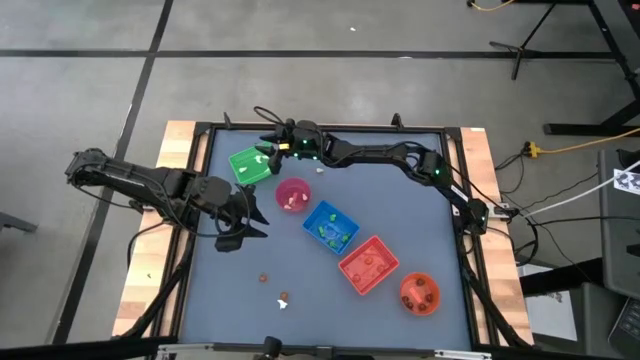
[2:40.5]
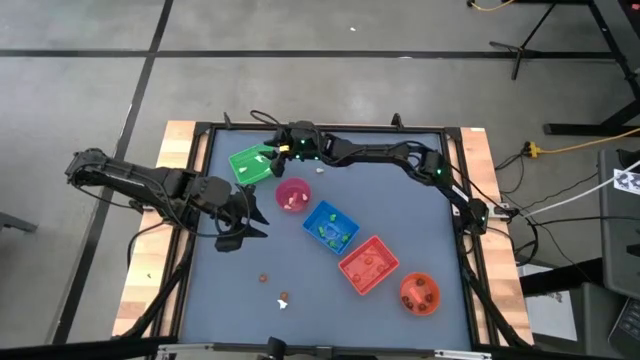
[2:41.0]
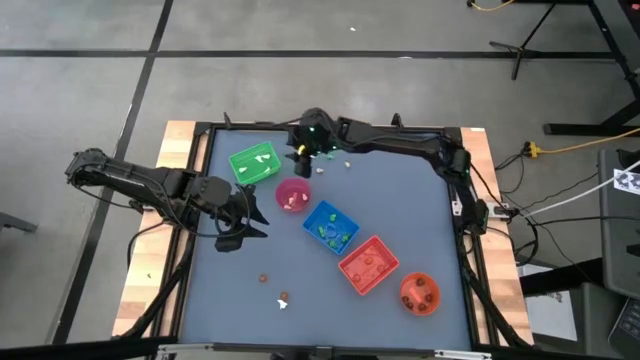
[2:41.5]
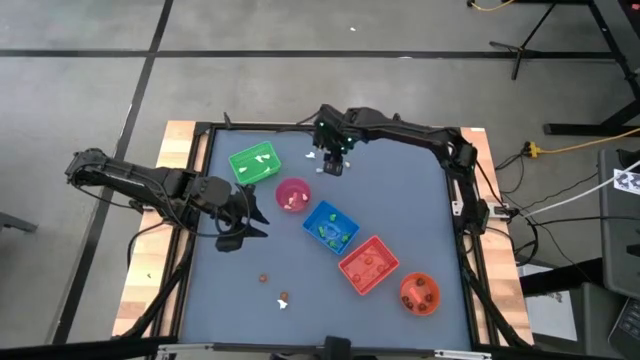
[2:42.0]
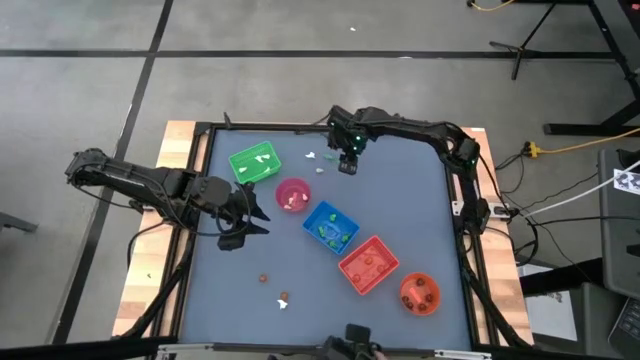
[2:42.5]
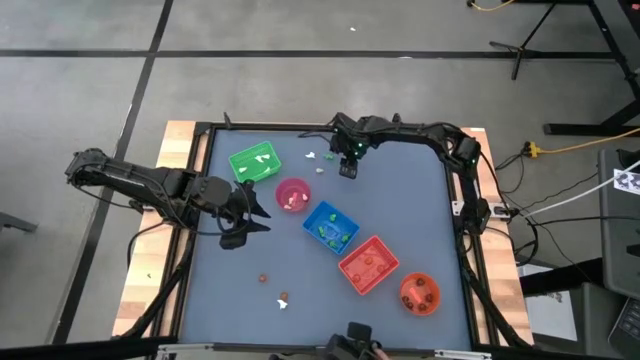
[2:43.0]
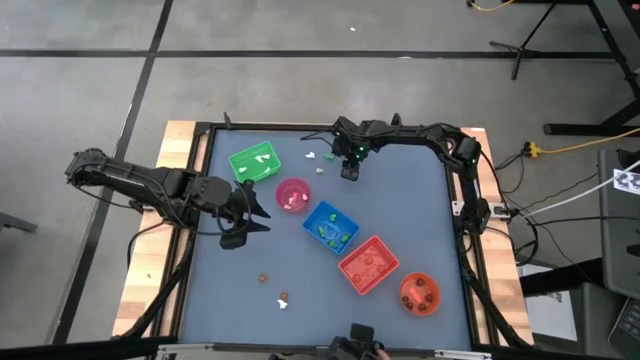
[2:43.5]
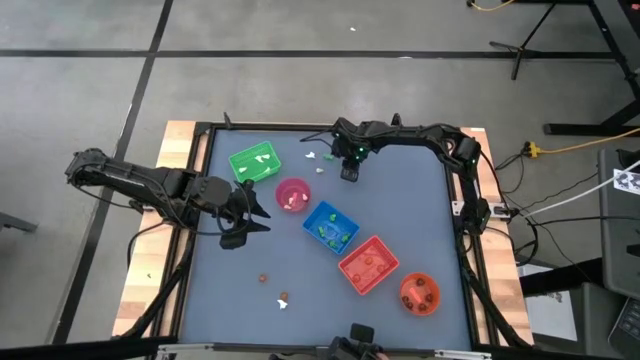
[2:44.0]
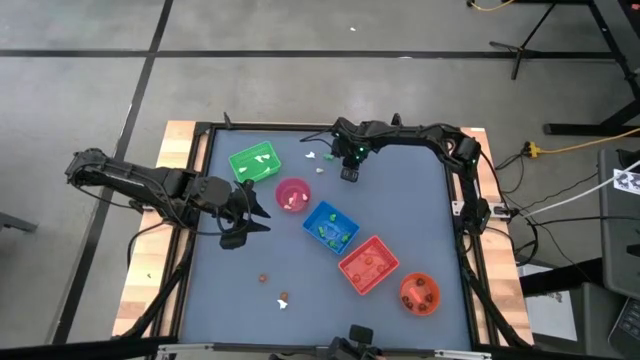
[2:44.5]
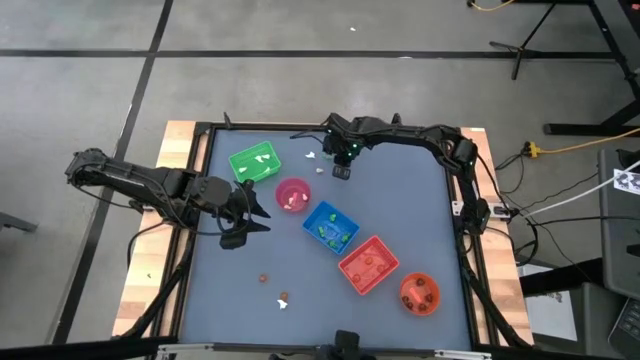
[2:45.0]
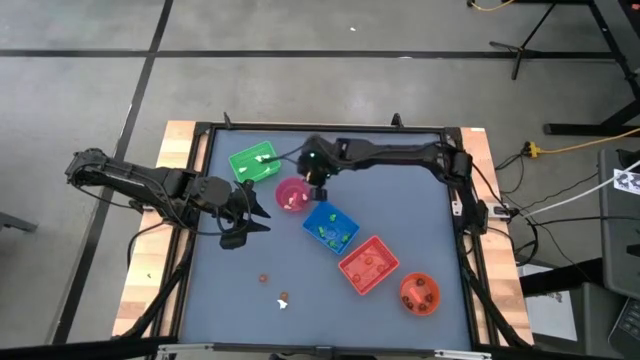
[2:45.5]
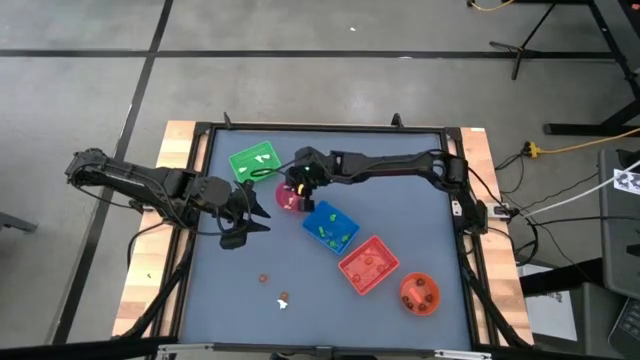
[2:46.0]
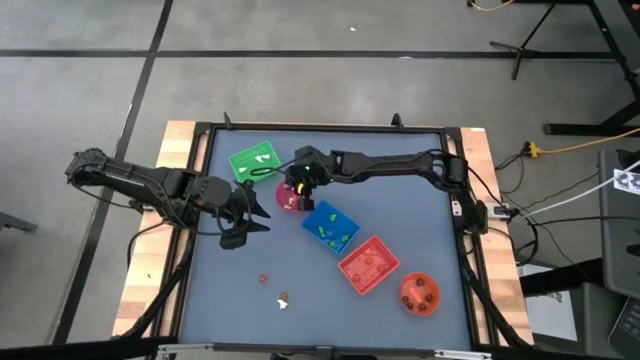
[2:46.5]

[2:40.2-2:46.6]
Task: Sort Halloween decoration
Put the light brown skull toy into the light red bin

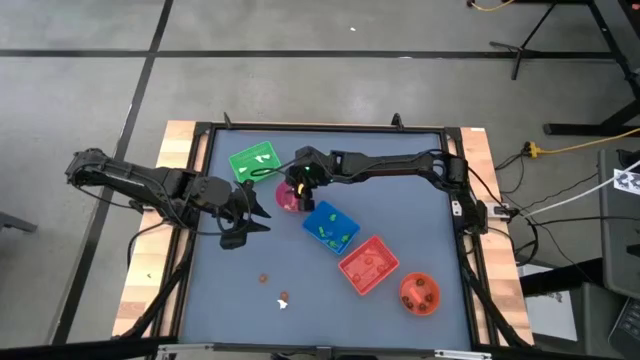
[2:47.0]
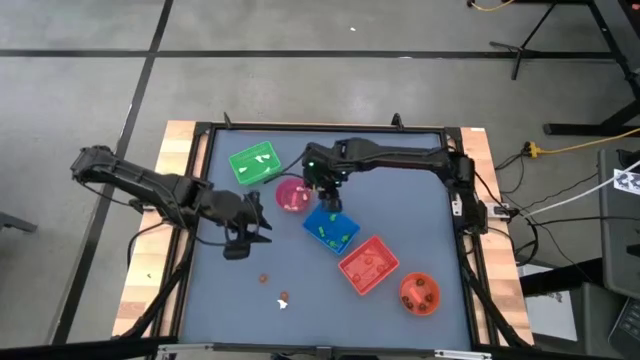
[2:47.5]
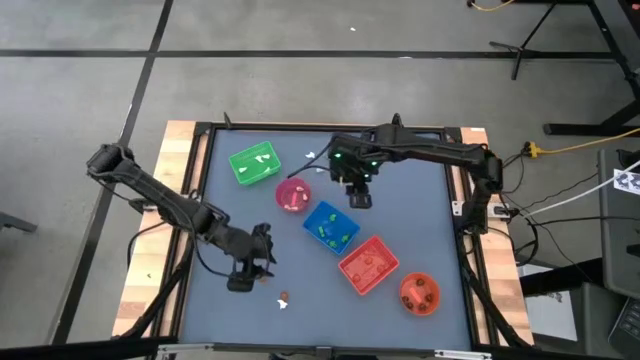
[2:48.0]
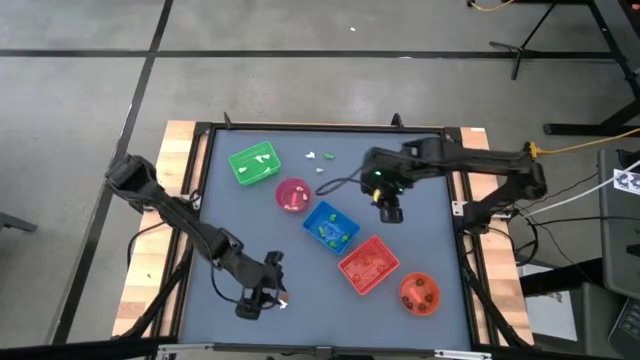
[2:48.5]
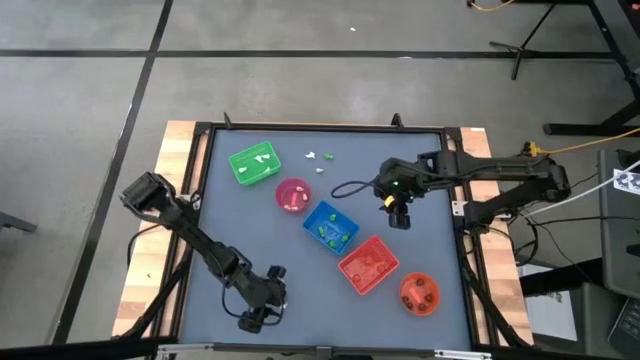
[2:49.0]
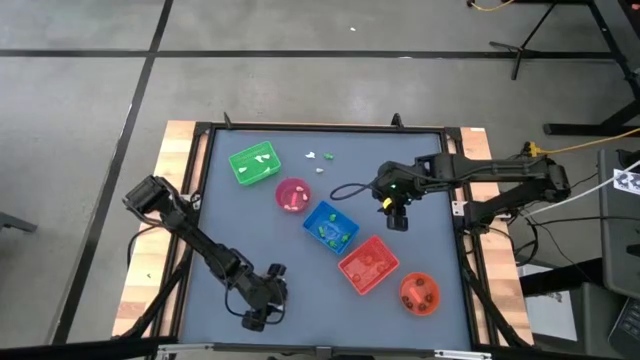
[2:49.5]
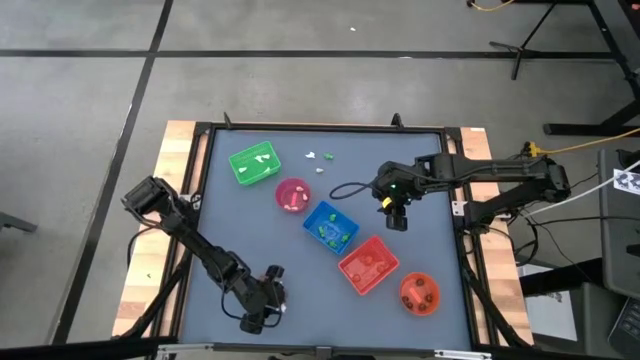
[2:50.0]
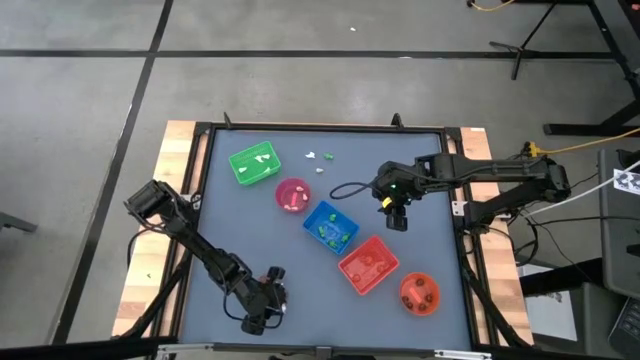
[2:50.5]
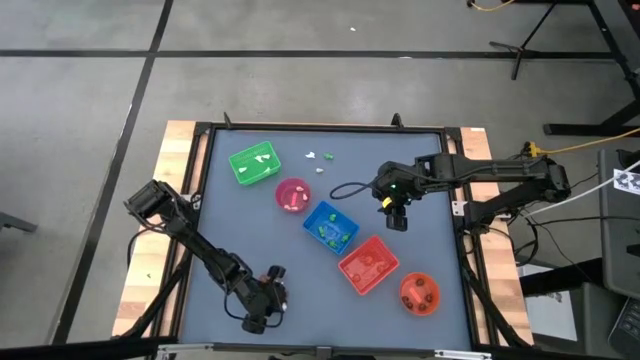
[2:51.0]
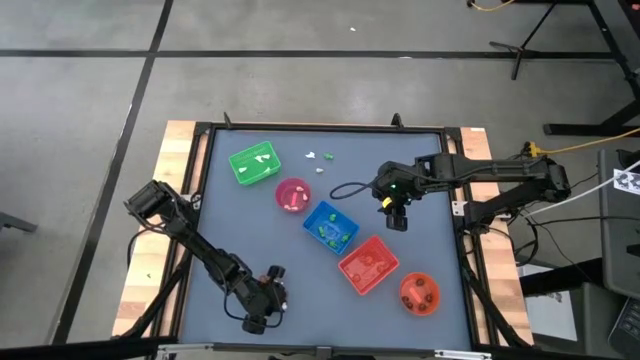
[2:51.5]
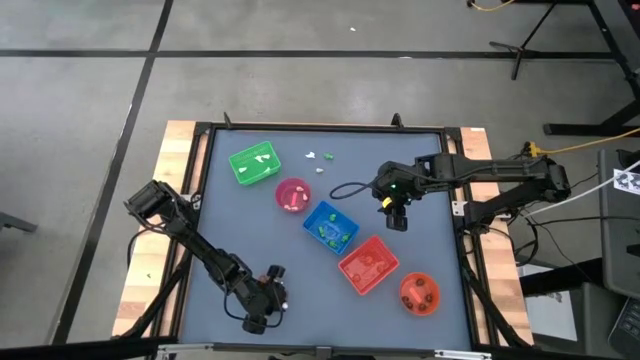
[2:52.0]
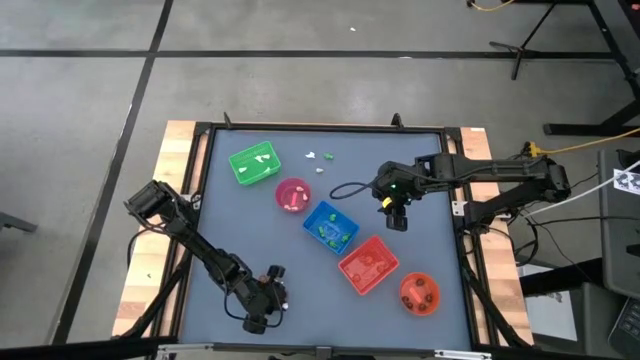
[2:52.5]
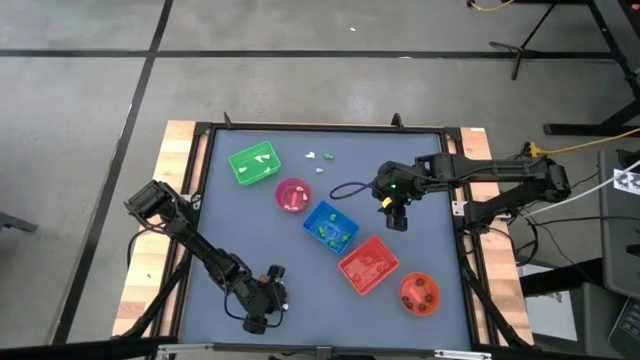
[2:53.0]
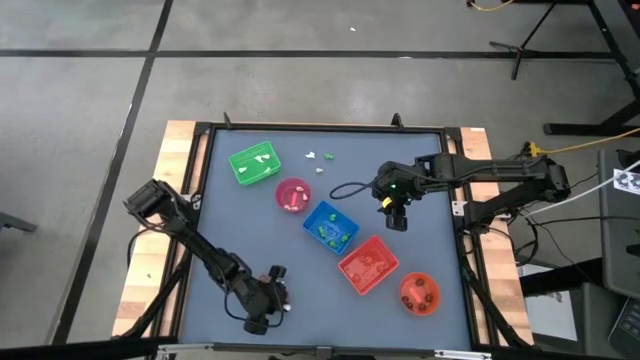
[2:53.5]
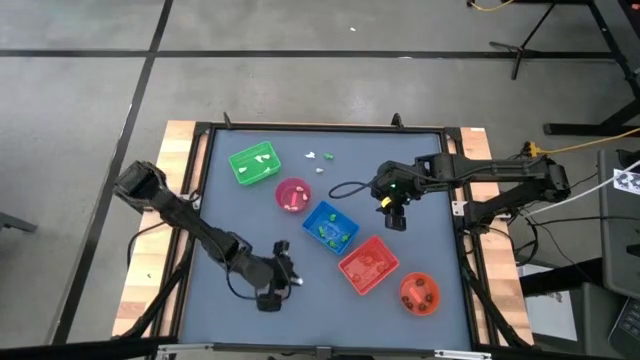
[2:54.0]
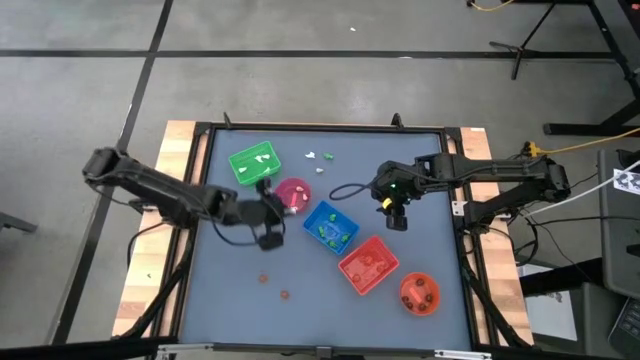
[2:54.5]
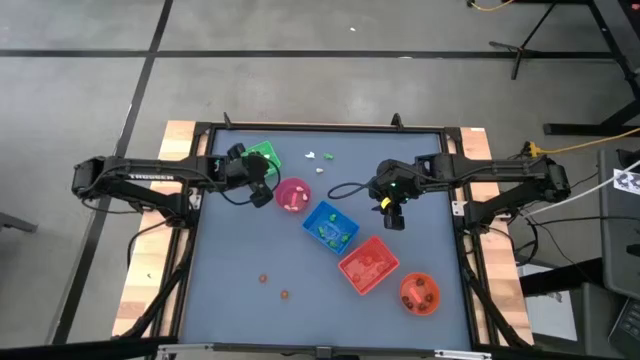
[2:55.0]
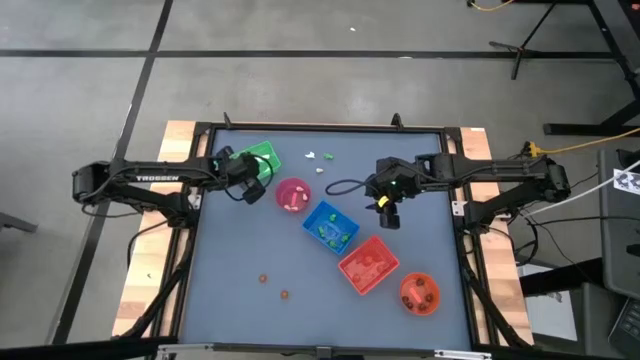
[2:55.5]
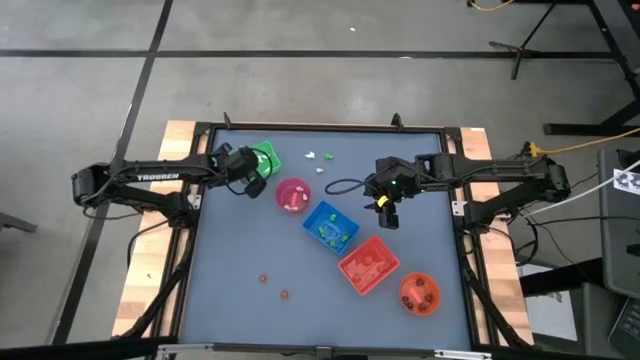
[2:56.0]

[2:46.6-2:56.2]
Put the white ghost toy into the green bin

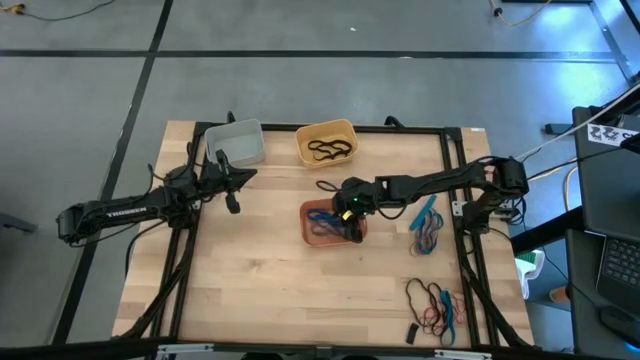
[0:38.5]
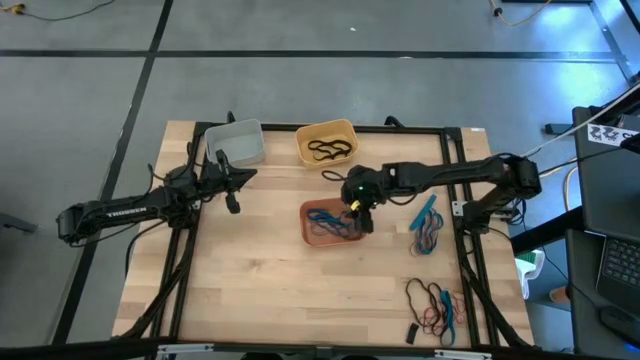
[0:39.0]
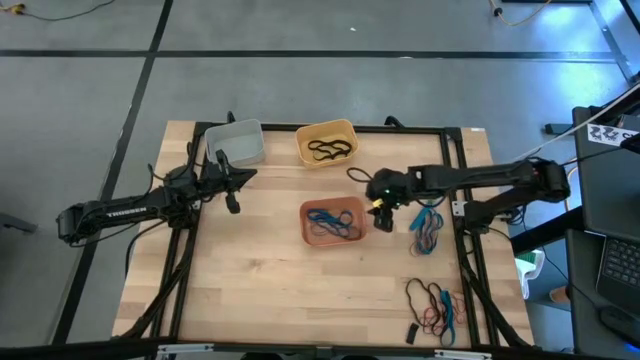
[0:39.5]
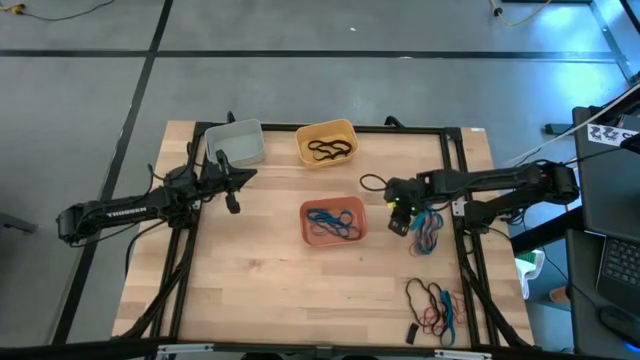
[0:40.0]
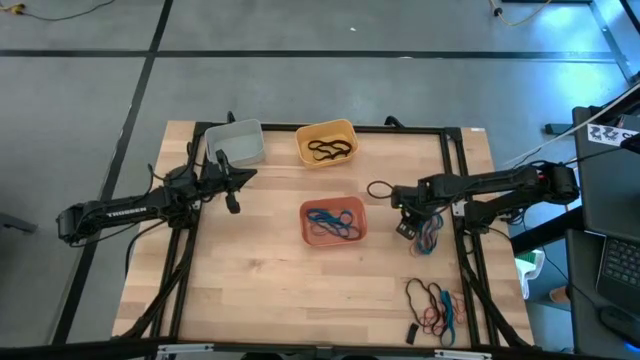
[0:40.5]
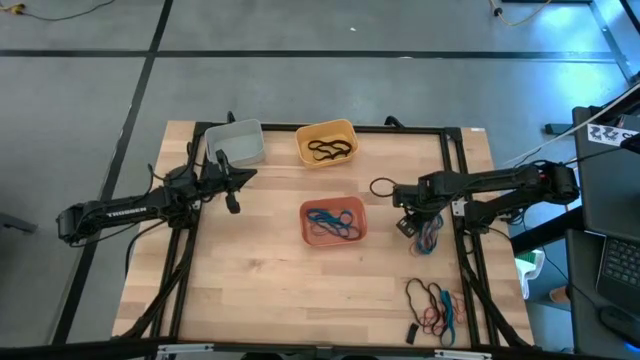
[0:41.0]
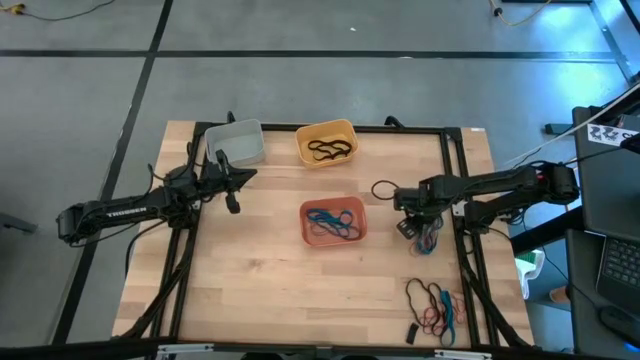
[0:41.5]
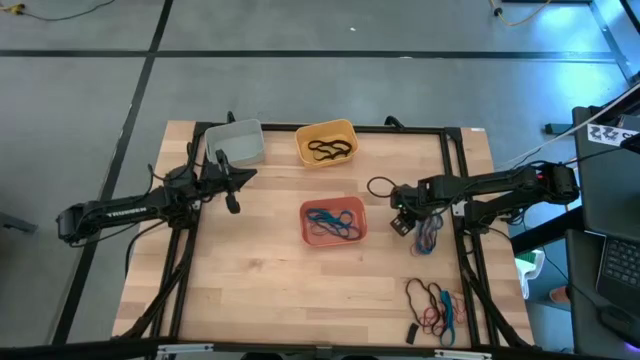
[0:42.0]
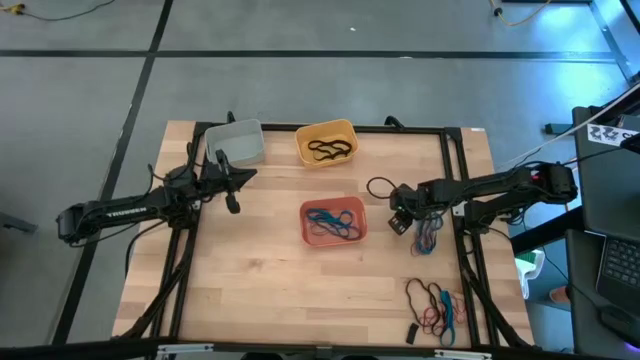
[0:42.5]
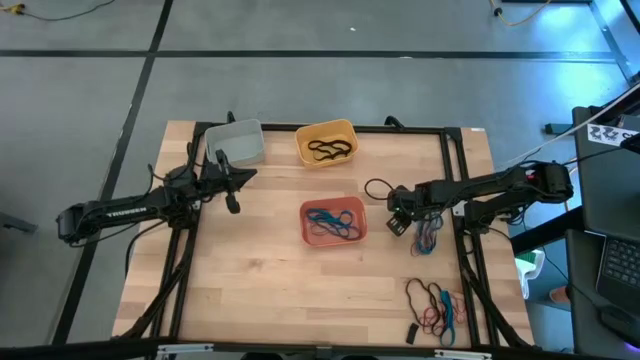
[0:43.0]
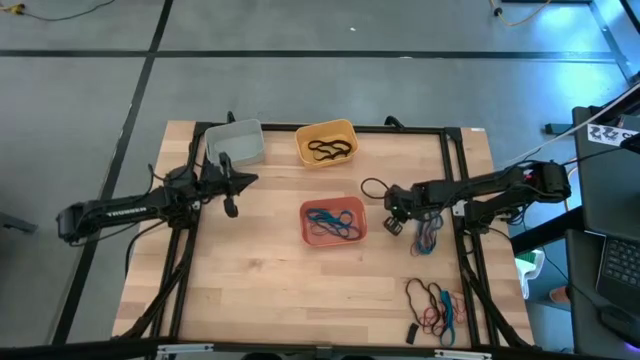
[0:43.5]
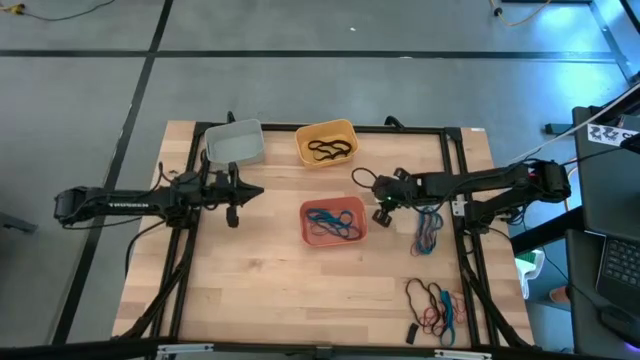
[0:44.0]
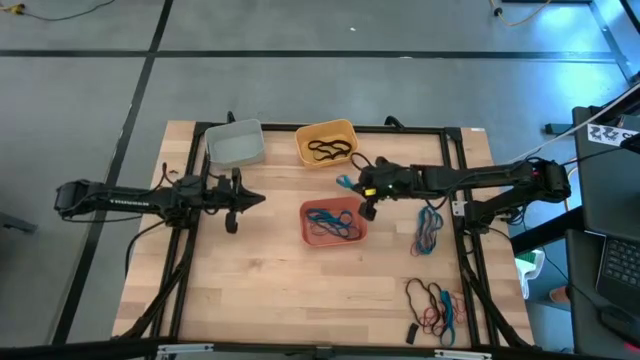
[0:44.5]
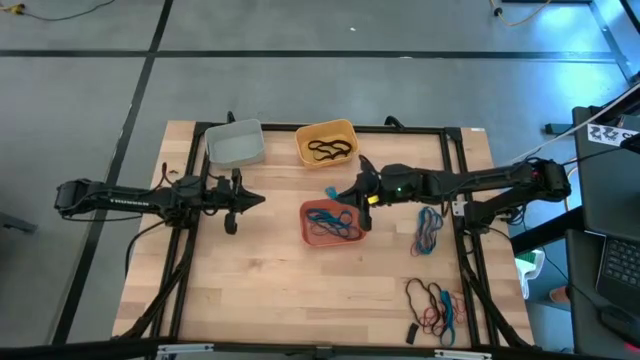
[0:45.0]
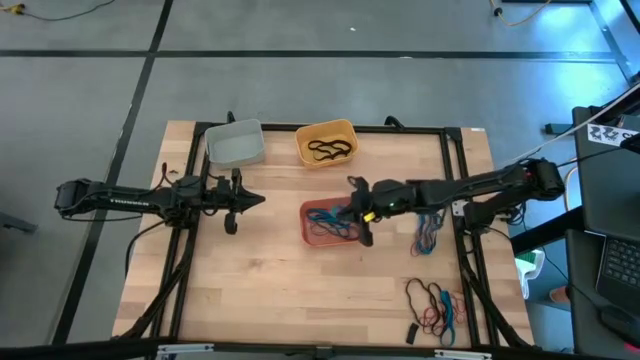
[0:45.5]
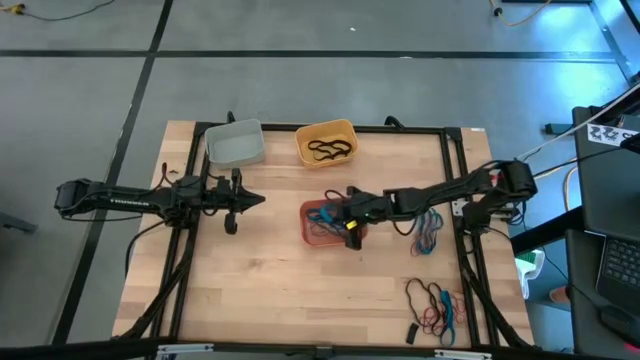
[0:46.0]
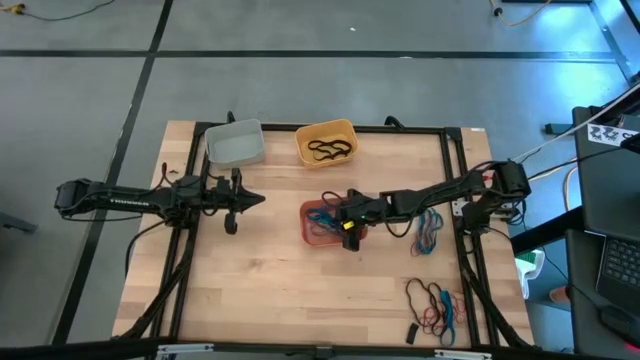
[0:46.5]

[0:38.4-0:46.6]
Task: Sort rubber bands into baskets
Put the blue rubber band into the orange bin
